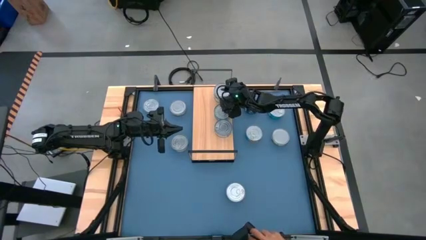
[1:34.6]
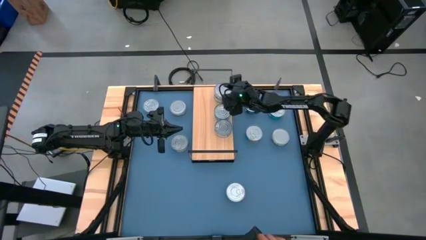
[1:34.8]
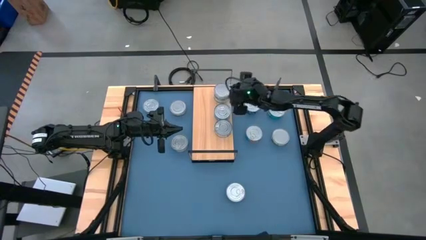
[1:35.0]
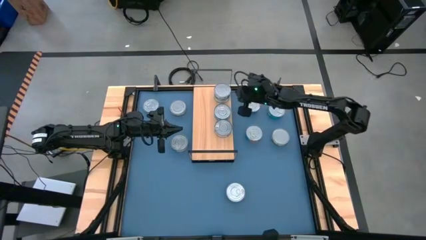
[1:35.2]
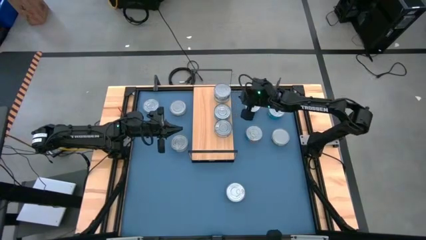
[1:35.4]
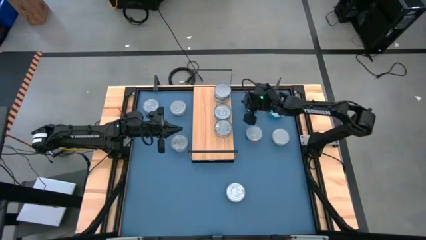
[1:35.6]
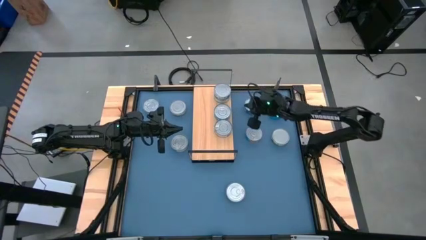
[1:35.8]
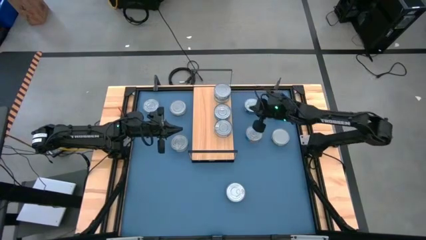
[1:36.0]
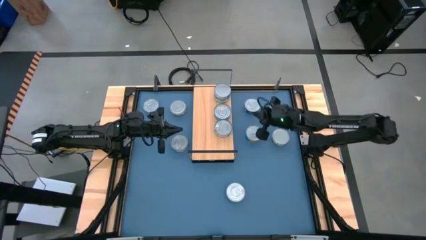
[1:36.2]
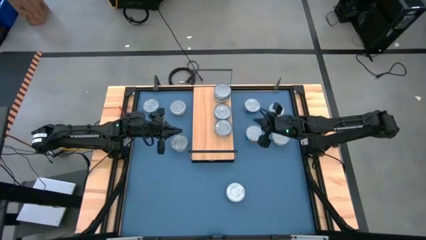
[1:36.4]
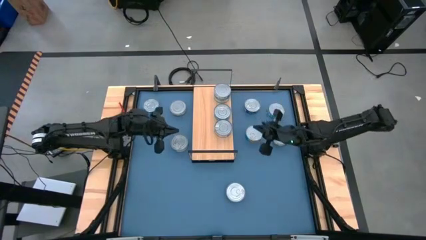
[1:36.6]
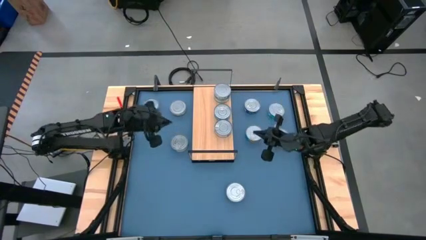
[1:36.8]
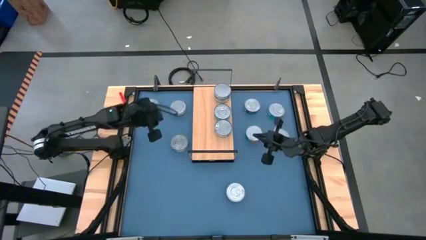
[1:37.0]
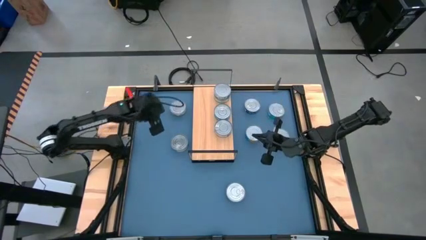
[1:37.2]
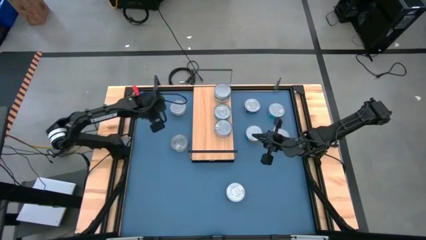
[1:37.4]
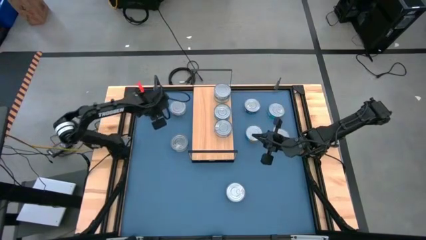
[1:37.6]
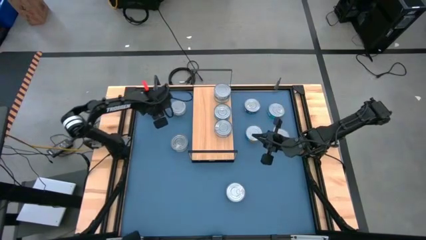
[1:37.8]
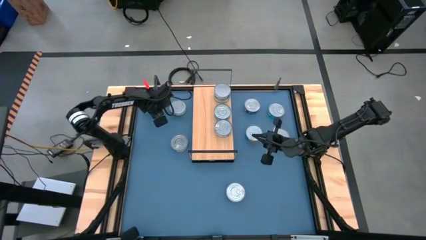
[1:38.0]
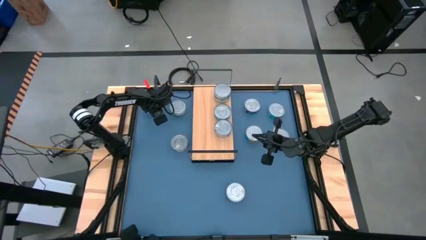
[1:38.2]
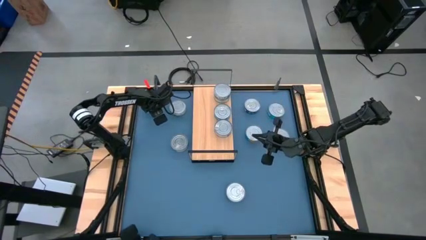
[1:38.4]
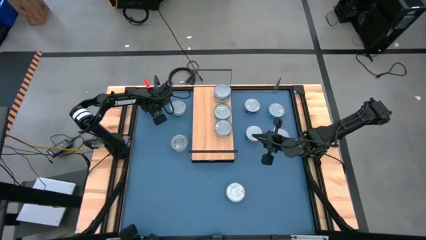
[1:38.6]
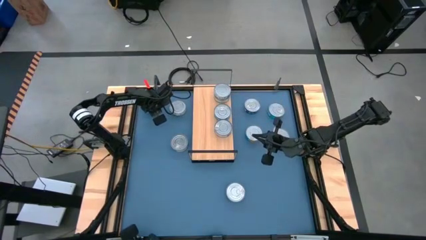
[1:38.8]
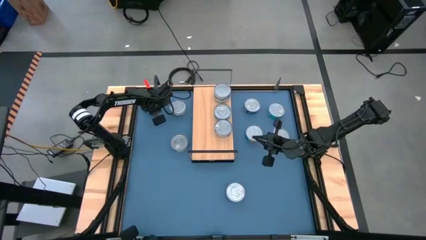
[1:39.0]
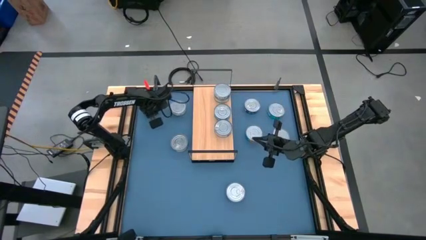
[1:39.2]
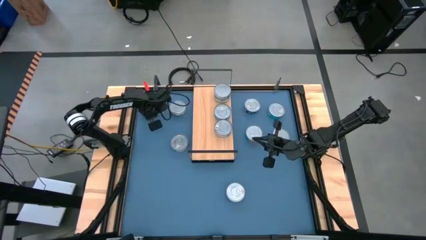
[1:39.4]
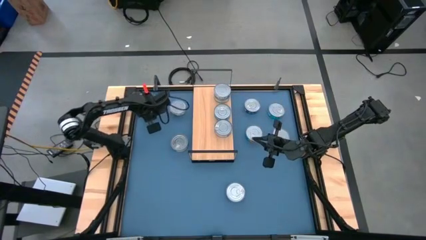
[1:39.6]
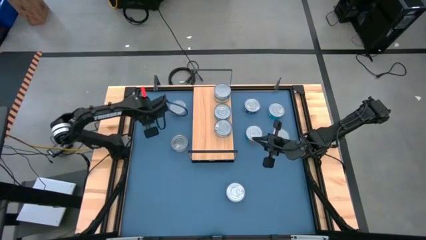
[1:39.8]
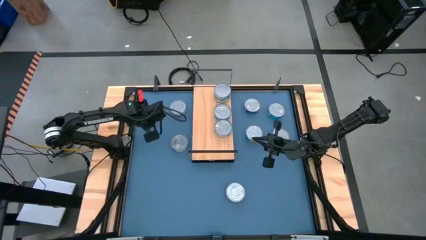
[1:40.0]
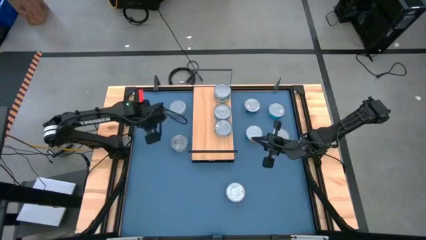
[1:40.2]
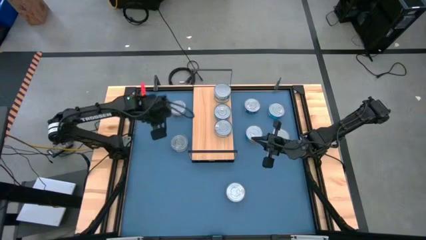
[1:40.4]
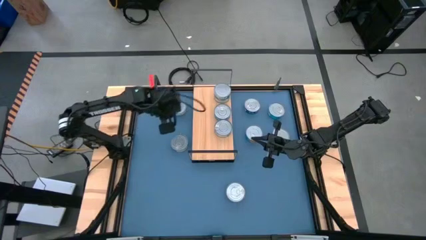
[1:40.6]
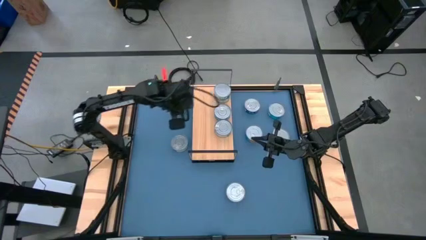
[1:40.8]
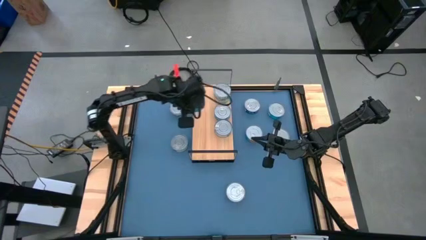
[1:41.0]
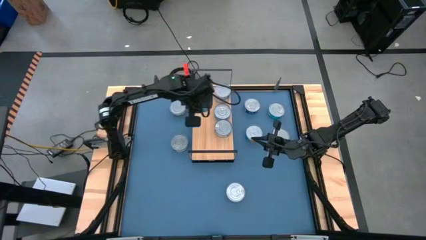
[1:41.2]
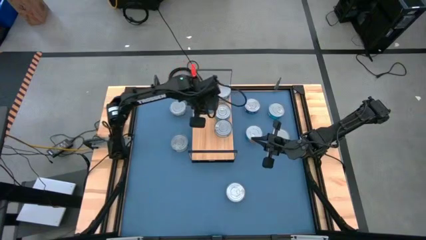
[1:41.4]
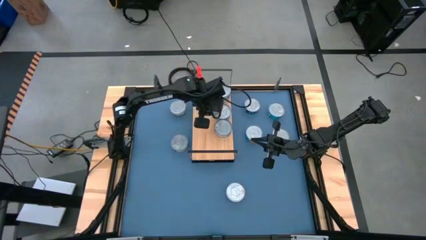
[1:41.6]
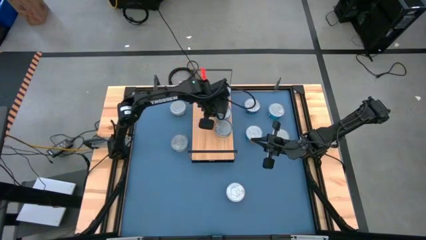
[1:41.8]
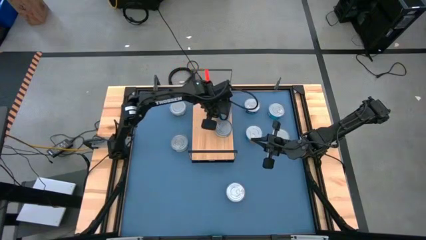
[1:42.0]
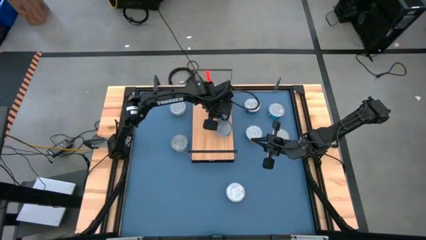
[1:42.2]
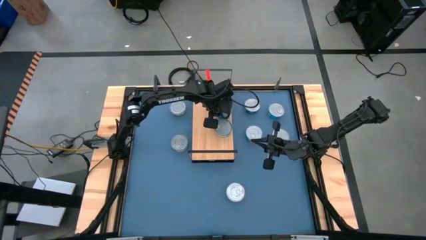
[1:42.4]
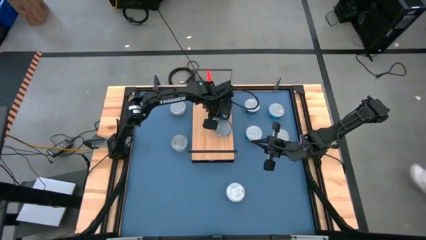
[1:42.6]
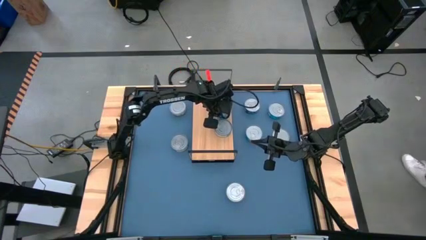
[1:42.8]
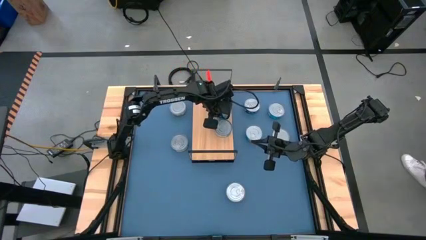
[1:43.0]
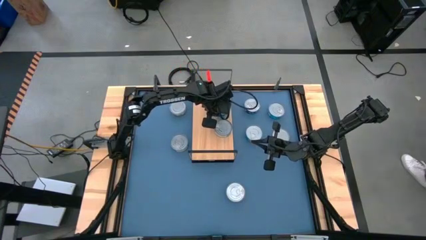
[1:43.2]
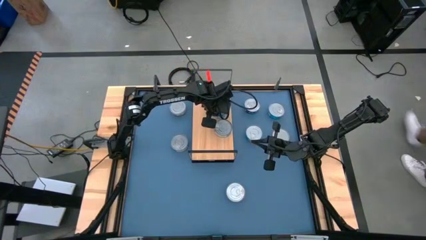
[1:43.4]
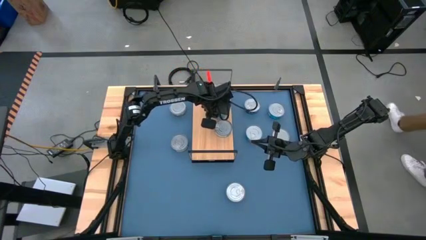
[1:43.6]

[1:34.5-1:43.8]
Task: Stack canned seafood by type on shelf
Stack the yellow blue tuna can on top of the other yellow blue tuna can on the shelf

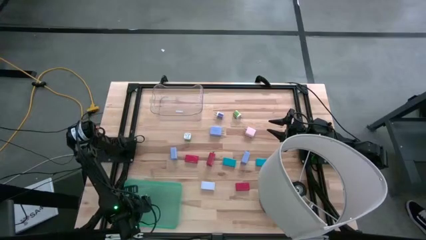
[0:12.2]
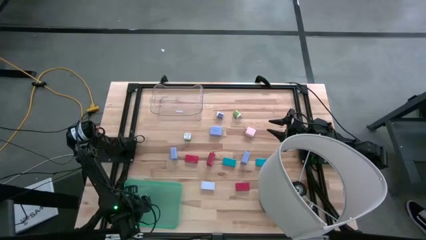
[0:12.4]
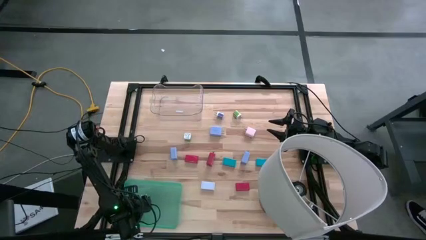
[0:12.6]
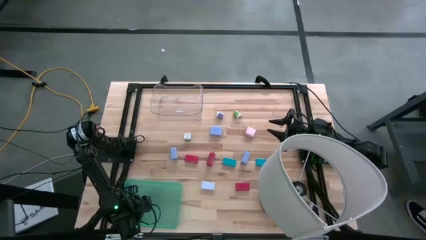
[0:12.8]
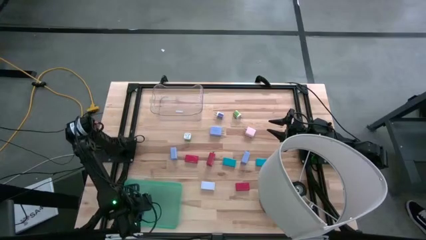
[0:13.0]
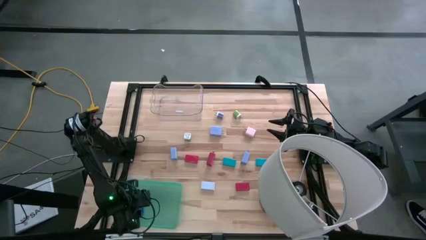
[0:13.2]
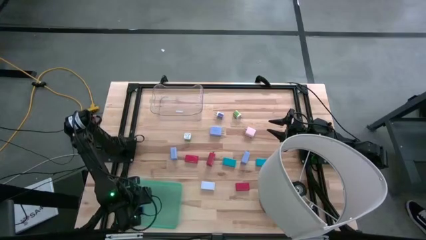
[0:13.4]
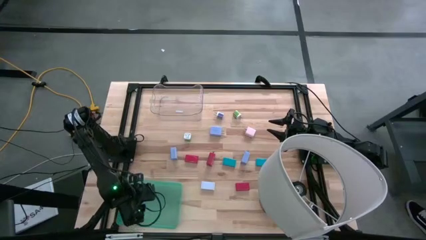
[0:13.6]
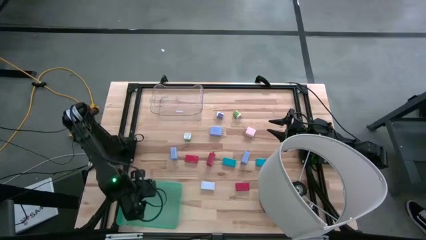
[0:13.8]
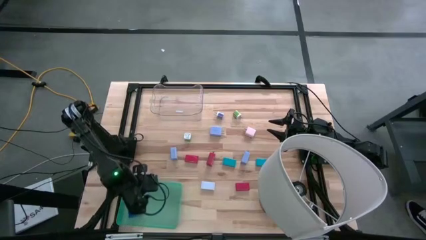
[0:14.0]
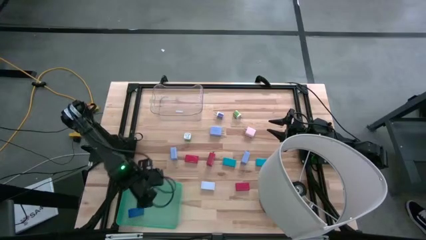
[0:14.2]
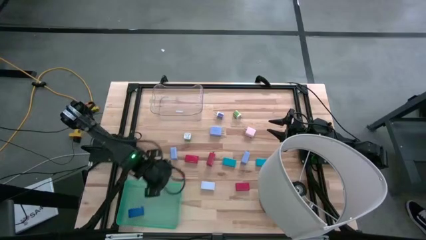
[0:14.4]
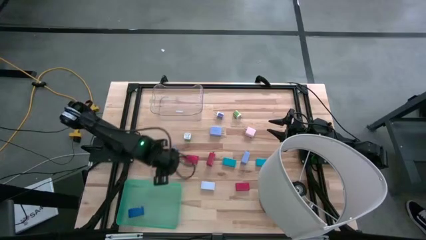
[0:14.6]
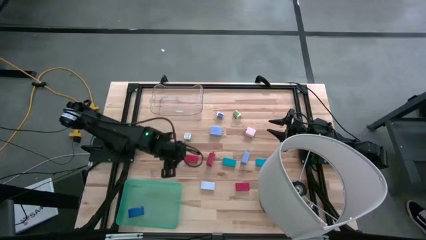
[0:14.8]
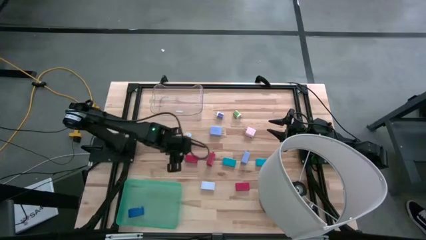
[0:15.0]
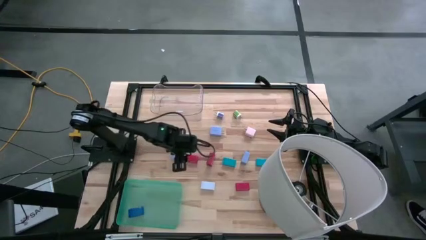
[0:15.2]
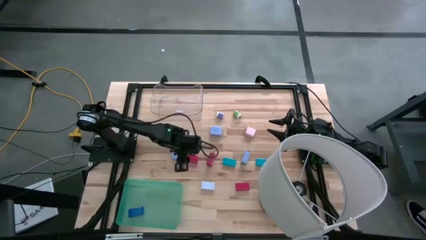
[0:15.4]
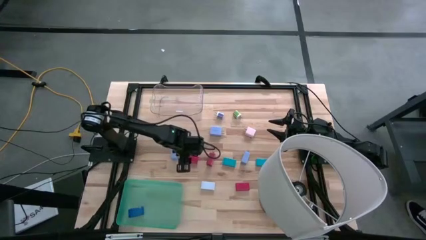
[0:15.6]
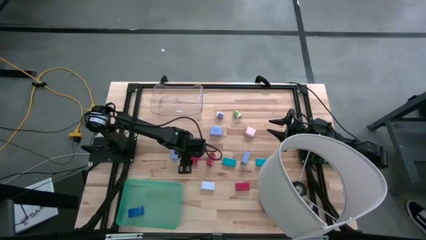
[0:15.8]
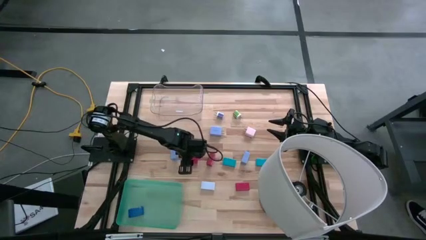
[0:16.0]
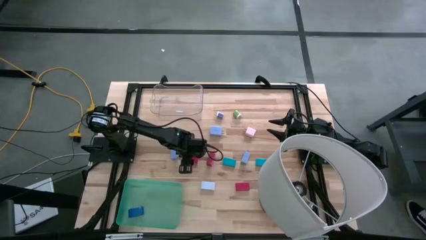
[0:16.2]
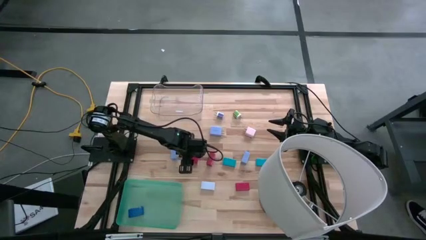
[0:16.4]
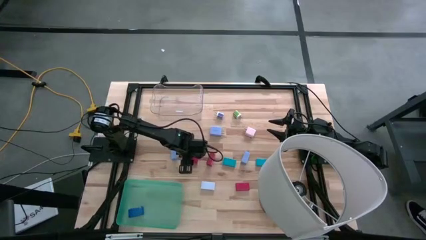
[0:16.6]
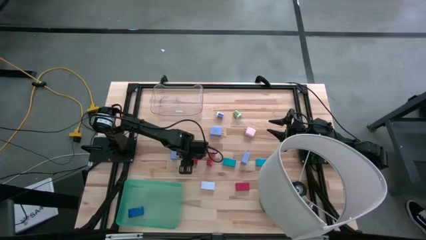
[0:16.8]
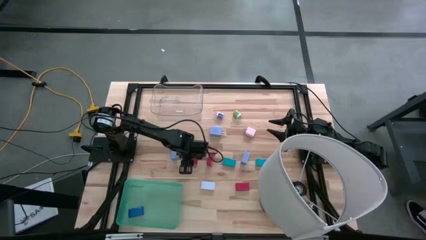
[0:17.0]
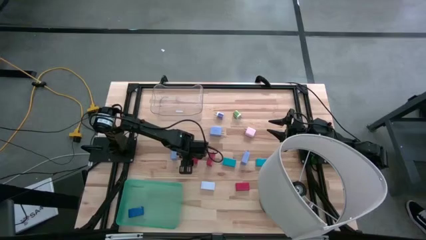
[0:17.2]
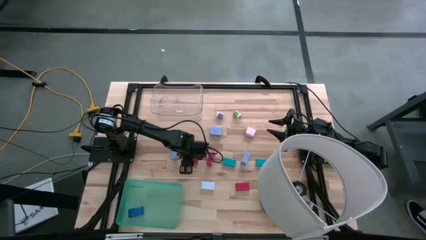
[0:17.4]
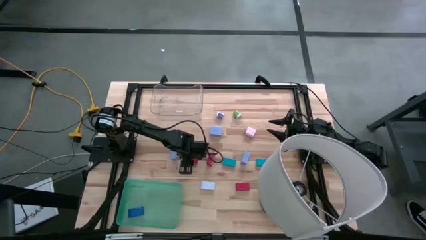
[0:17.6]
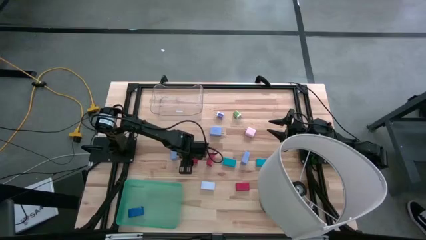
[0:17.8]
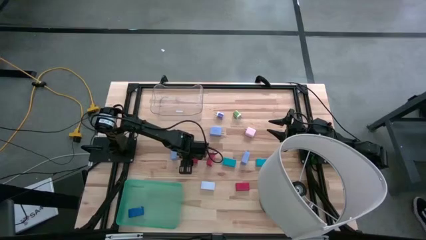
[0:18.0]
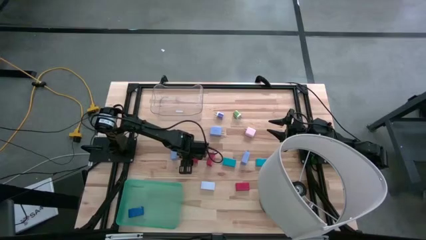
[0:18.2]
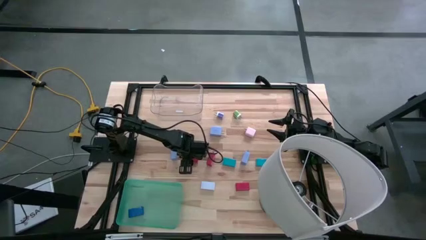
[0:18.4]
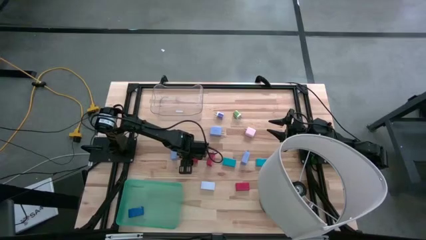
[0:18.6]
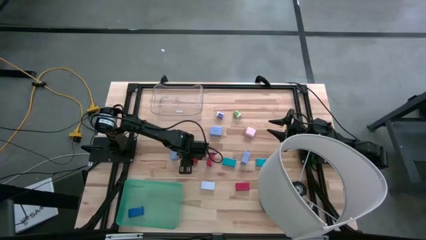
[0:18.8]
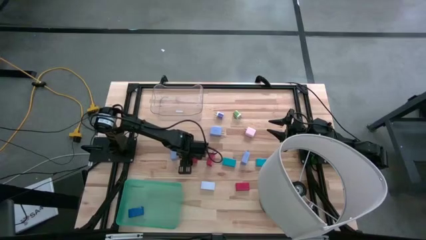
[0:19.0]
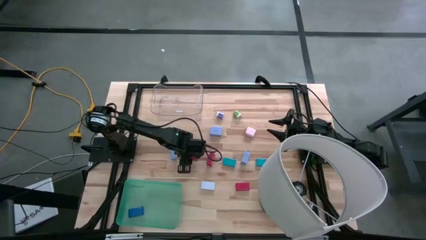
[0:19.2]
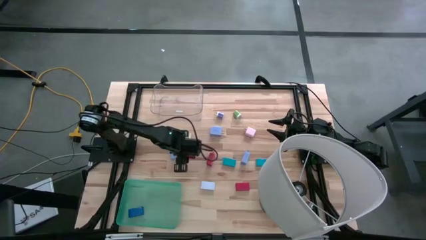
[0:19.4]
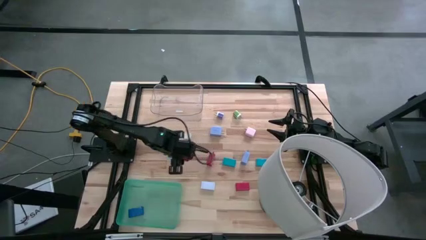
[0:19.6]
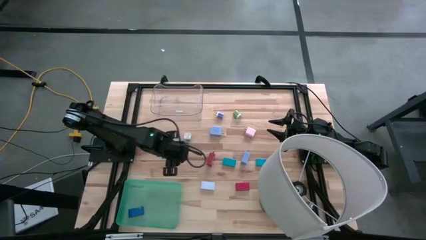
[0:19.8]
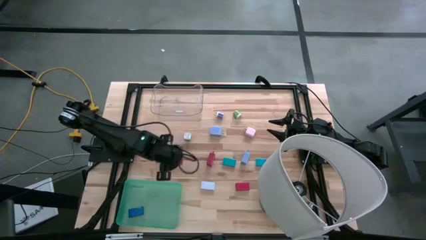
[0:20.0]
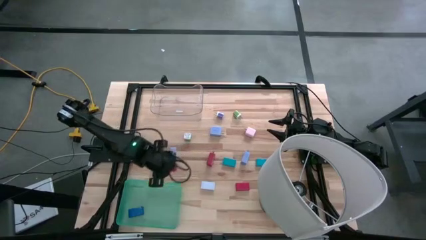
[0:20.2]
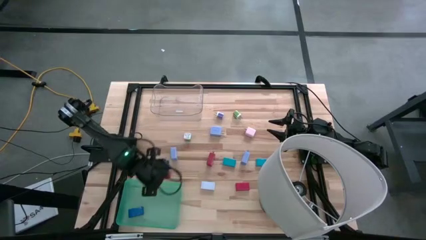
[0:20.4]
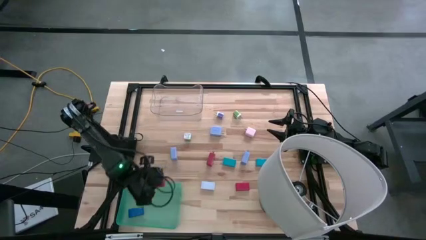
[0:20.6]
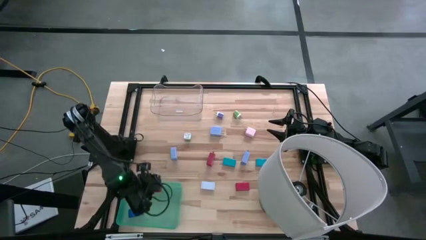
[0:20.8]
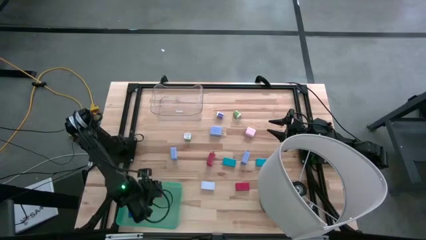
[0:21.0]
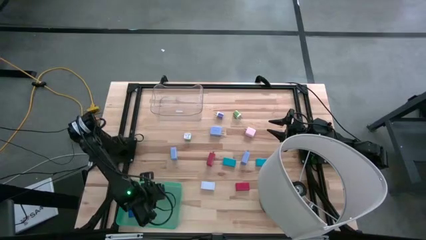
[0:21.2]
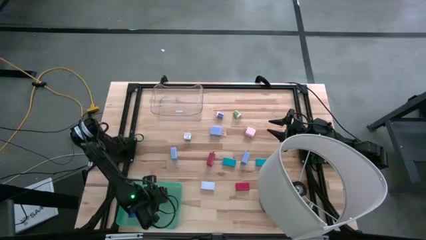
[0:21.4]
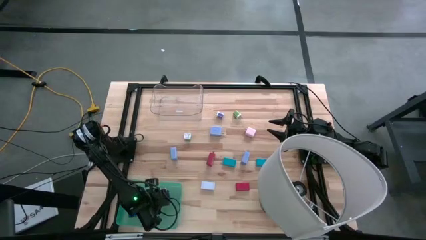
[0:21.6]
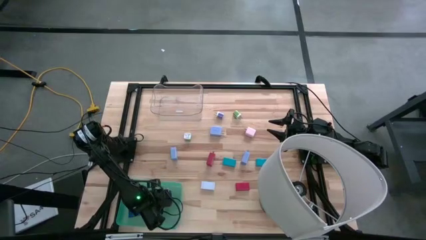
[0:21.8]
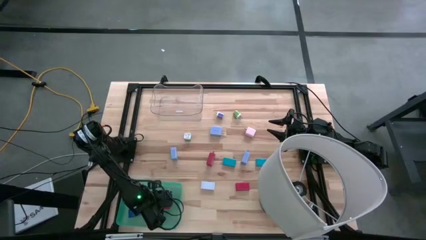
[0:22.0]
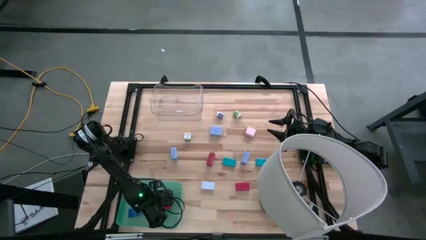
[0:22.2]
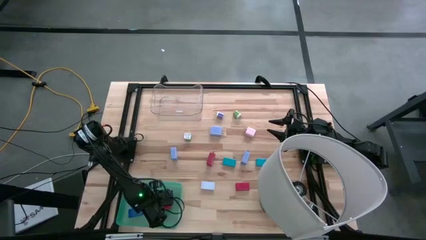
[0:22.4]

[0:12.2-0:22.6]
Task: Pick & Place Office items
Put the left red digital clock into the green bin
